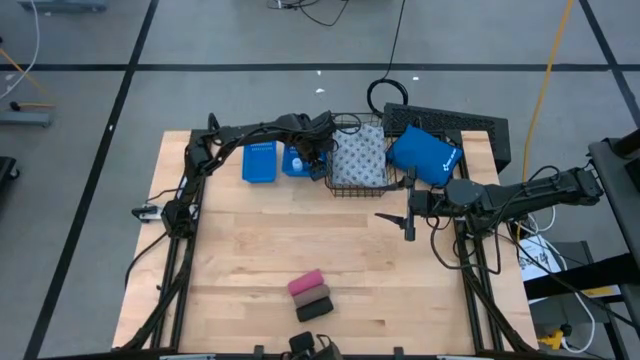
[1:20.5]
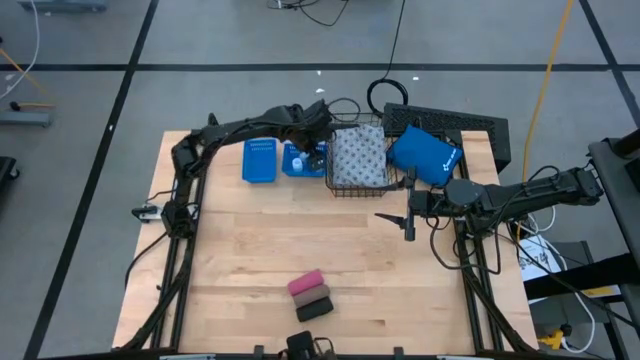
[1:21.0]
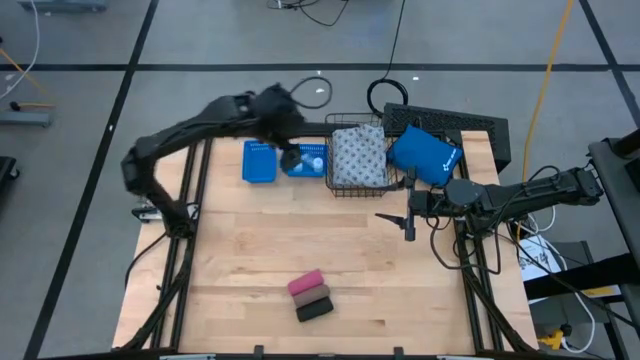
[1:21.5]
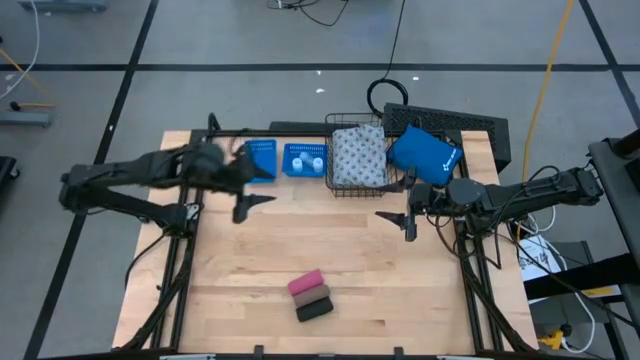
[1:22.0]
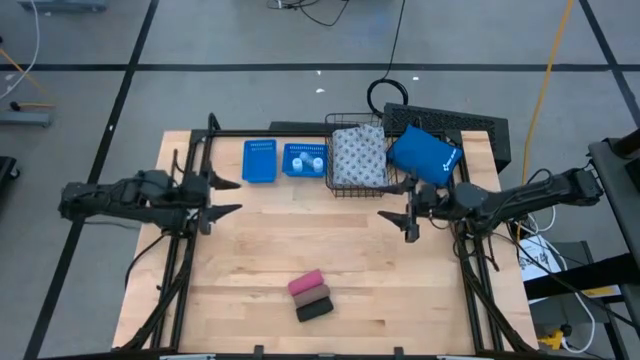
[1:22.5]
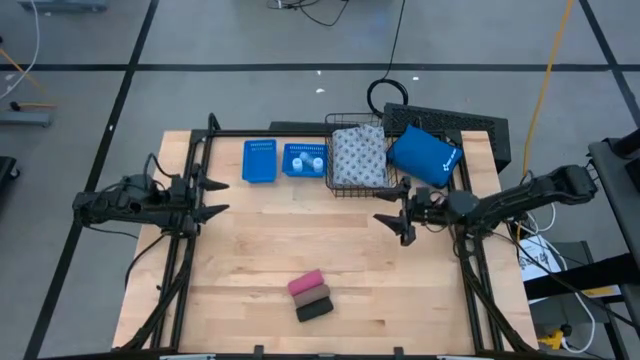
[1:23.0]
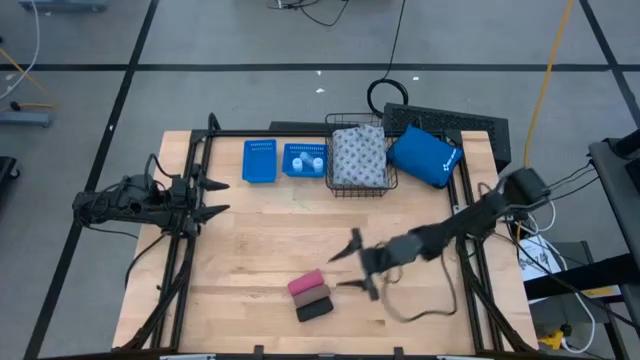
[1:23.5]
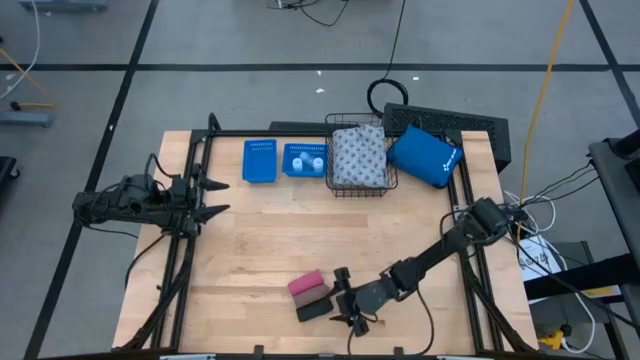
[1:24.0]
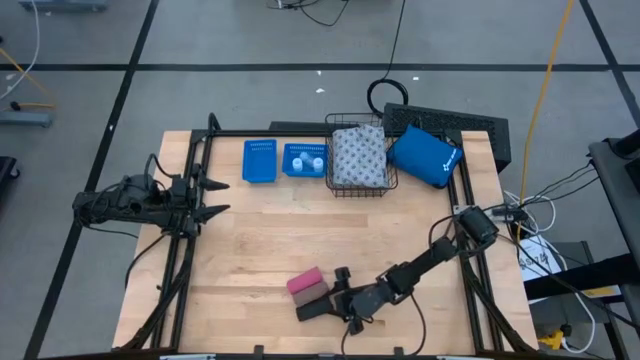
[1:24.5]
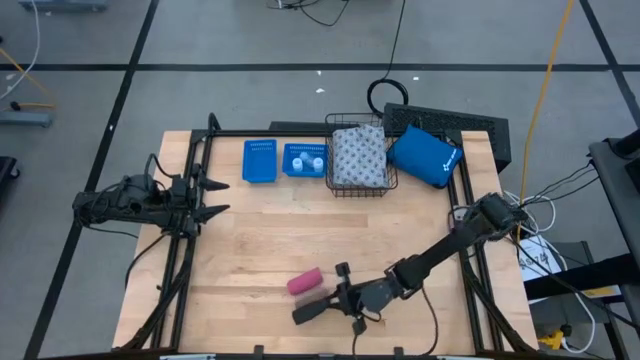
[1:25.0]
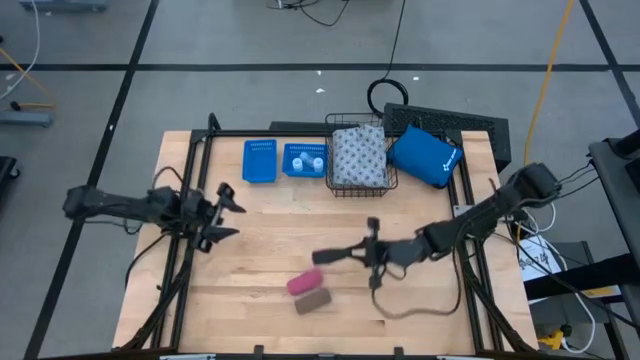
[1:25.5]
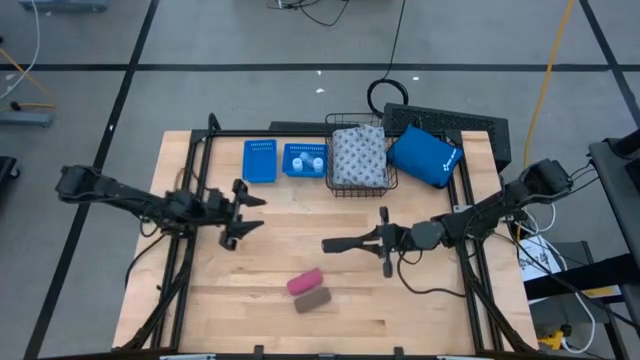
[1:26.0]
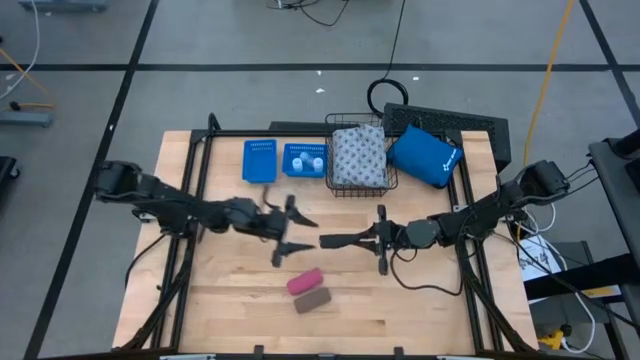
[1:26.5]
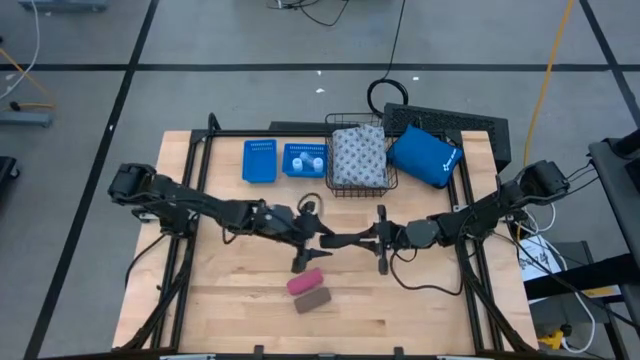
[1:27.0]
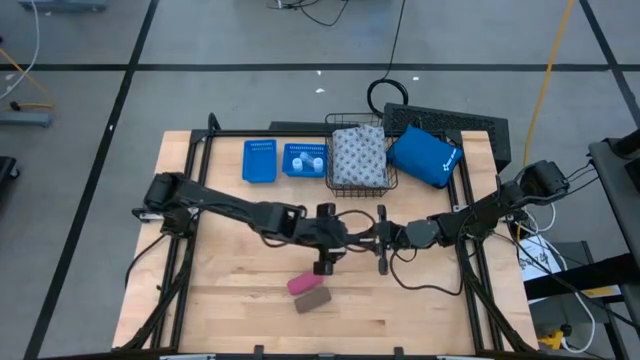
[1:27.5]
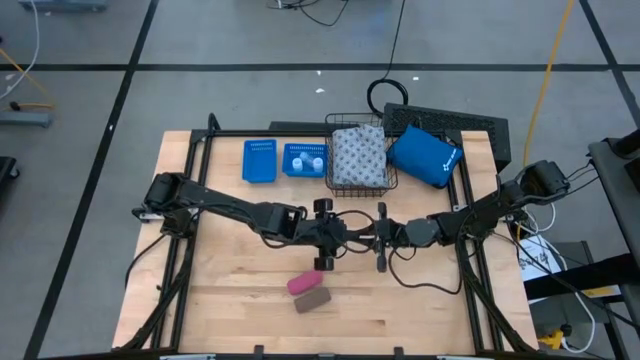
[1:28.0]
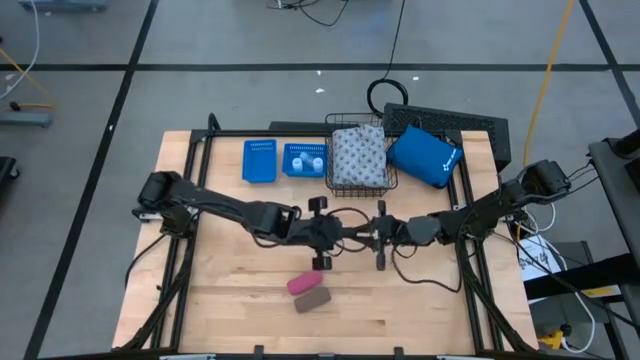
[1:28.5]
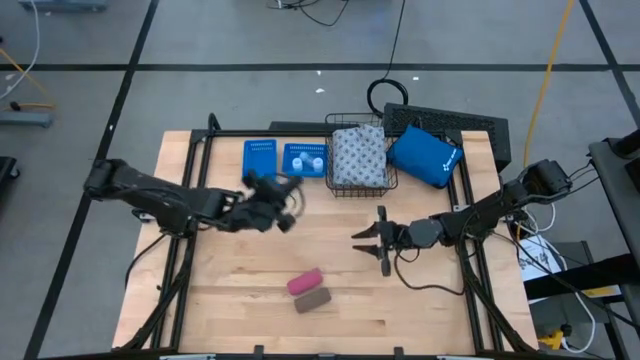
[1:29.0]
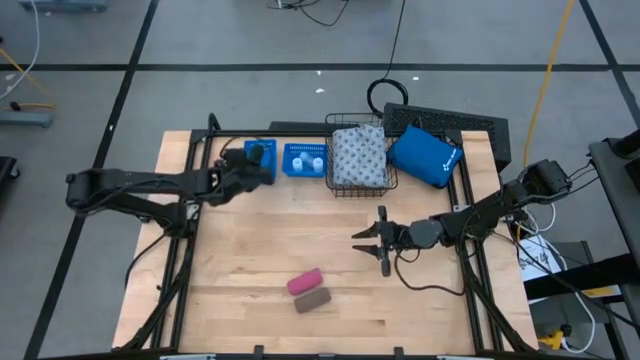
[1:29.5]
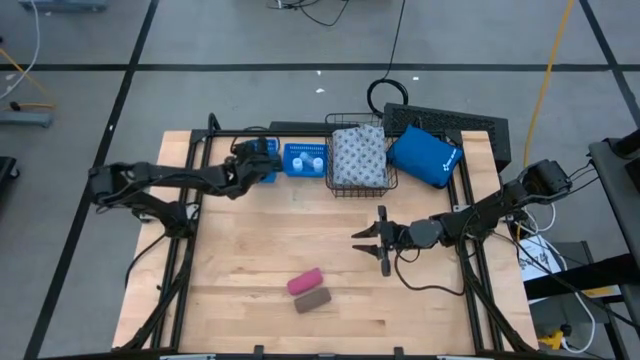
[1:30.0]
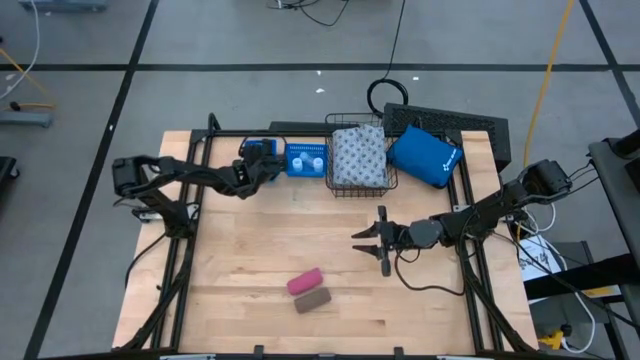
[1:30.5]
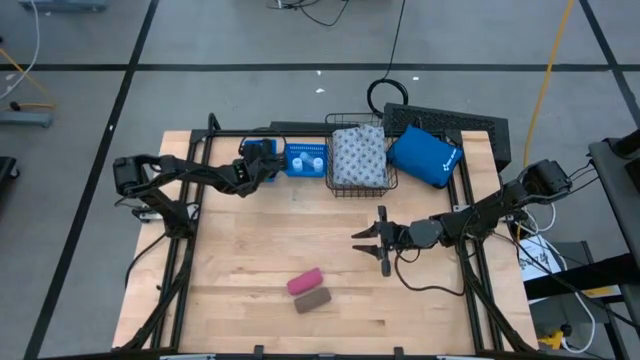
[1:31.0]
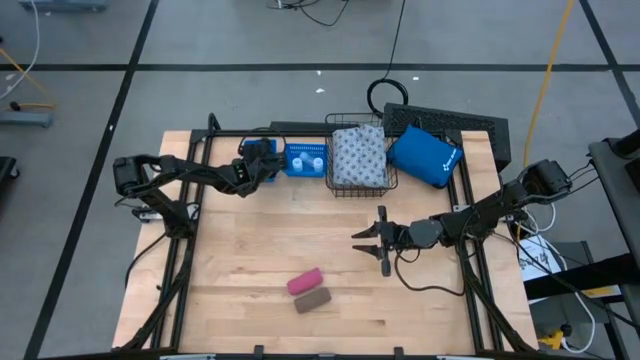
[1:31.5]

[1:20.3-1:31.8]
Task: Pick & Place Medicine items
Put the black bandage into the left blue bin

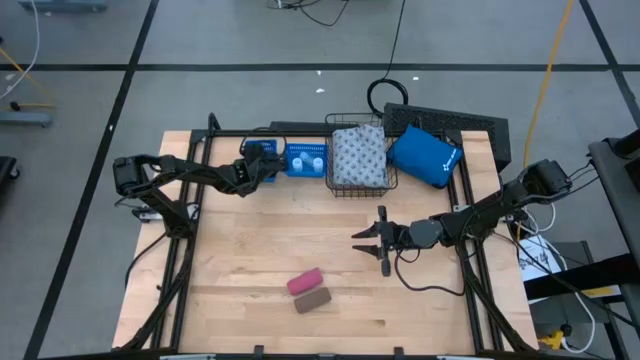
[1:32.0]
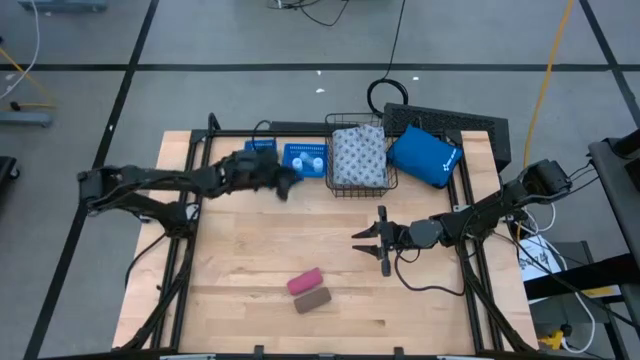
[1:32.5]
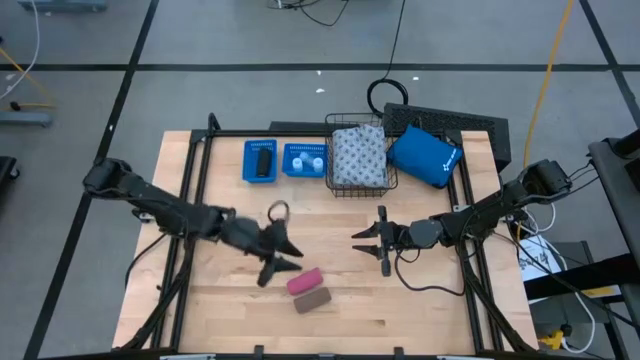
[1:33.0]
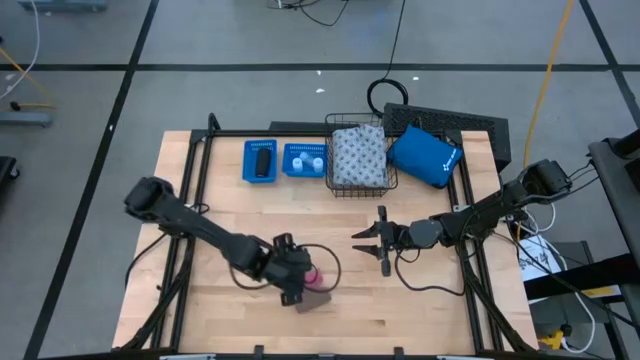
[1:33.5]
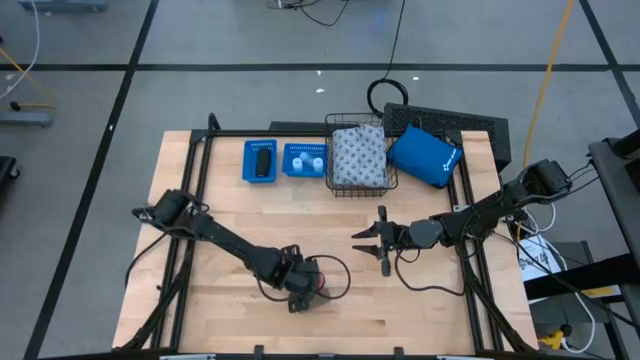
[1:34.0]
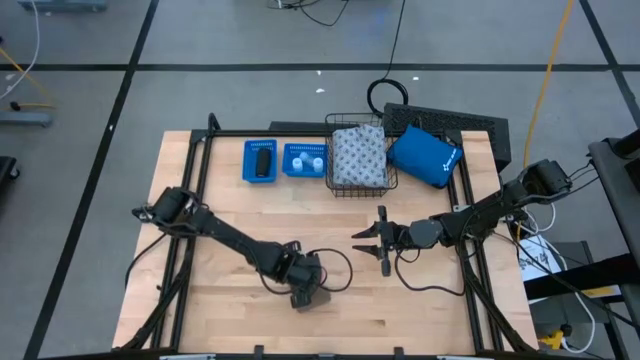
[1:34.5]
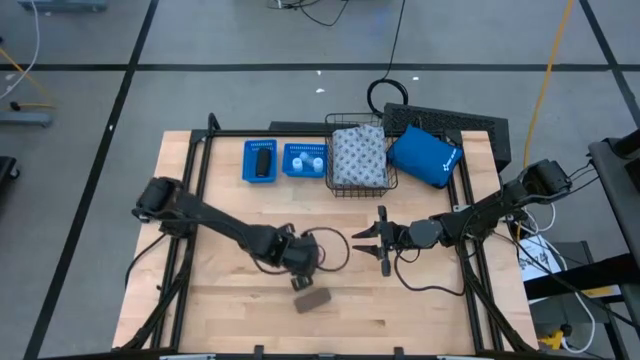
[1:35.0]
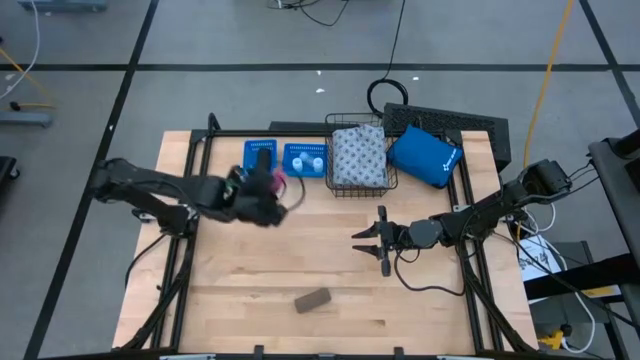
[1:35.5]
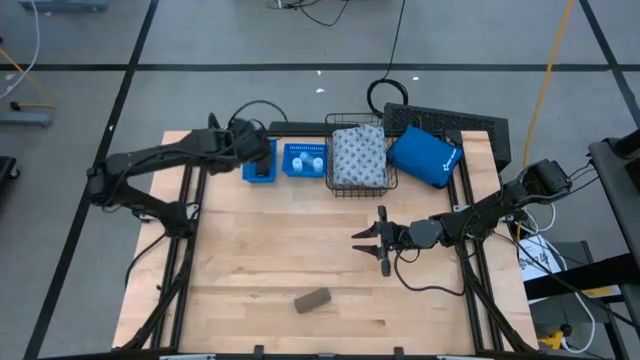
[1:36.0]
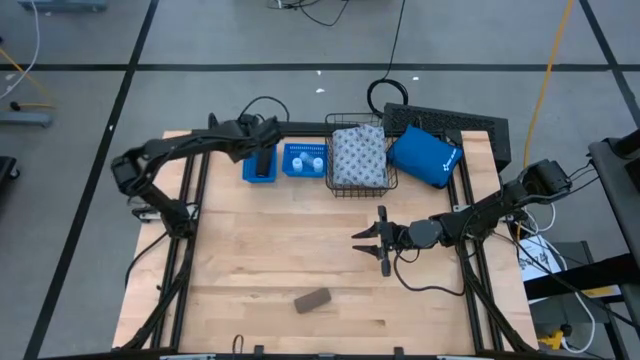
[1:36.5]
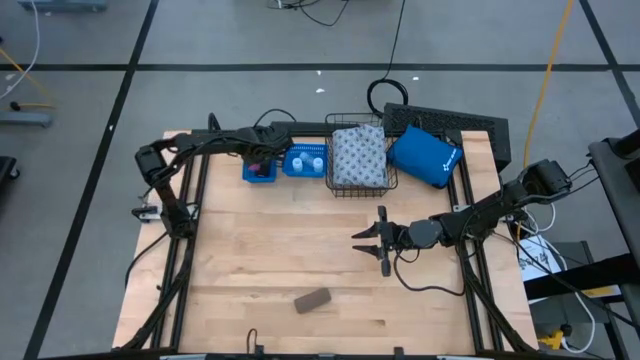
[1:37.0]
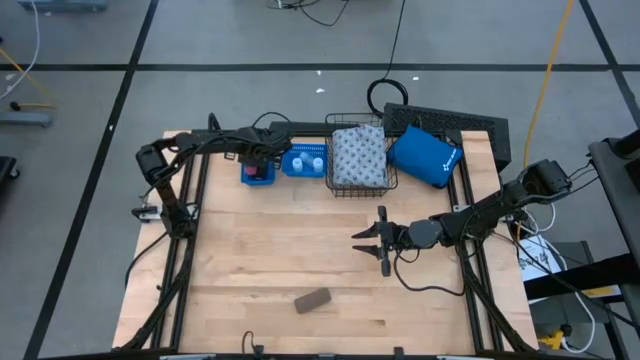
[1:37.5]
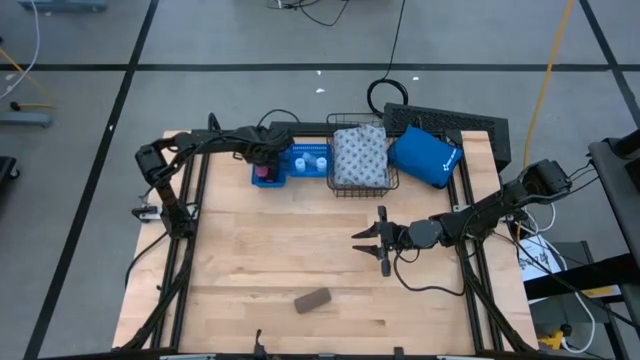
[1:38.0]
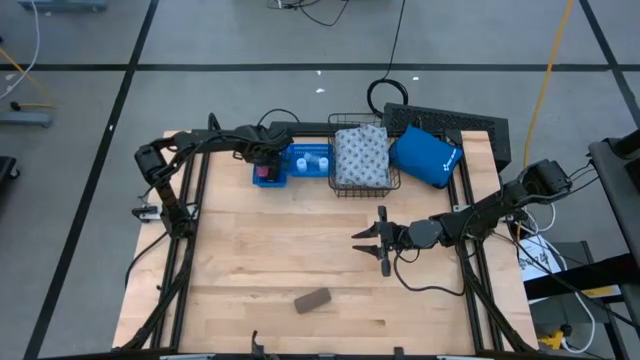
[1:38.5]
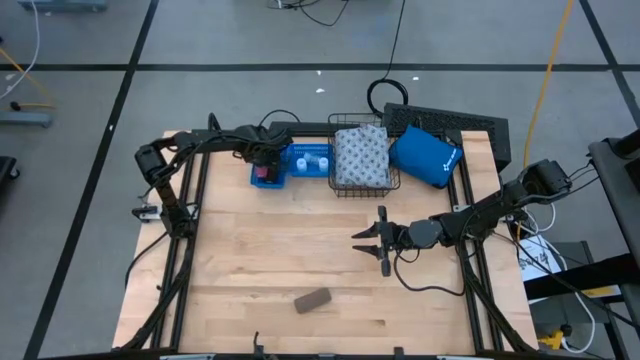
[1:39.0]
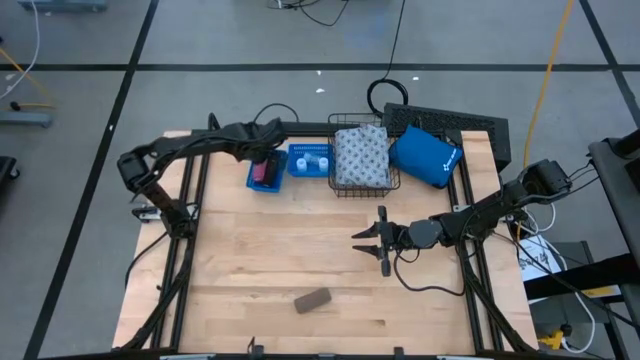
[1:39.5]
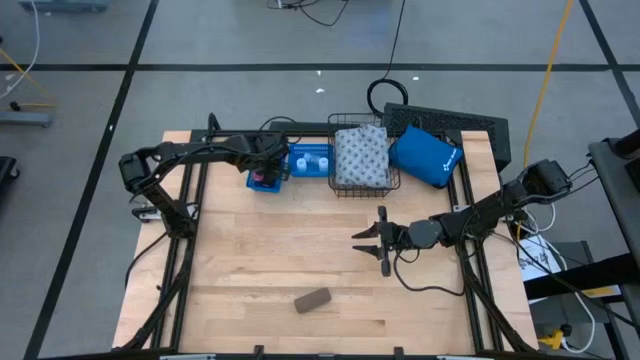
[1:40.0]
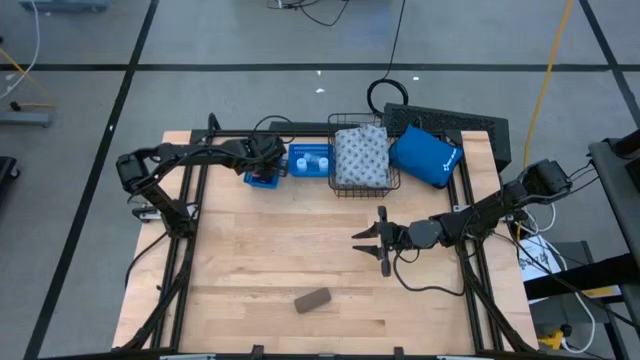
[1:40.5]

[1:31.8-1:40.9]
Put the pink bandage into the left blue bin

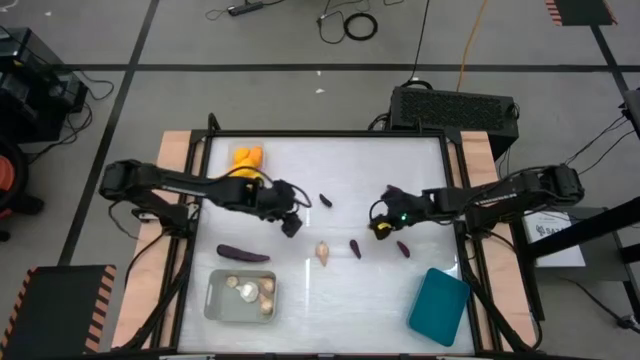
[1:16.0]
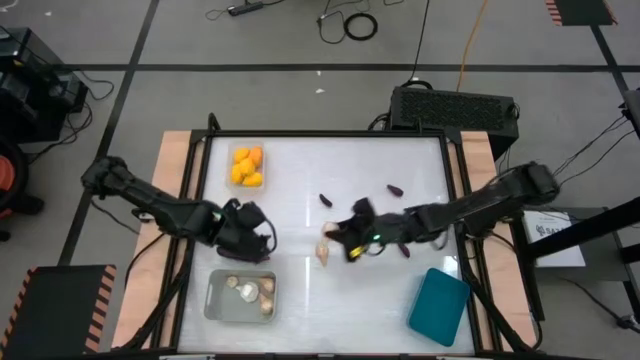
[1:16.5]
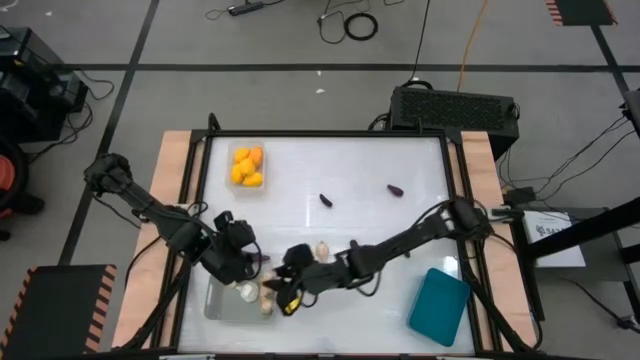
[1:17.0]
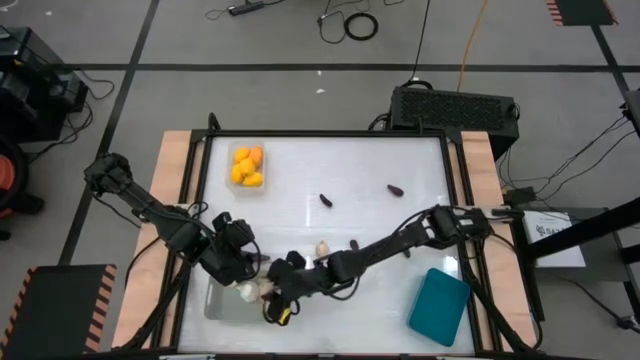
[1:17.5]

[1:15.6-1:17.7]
Task: Sort produce into baskets
Put the white garlic into the gray bin
